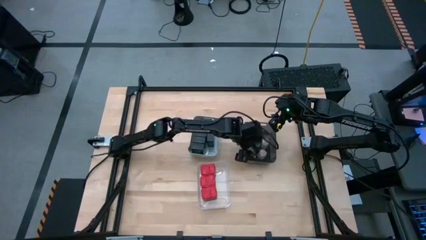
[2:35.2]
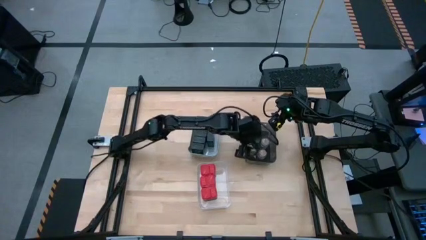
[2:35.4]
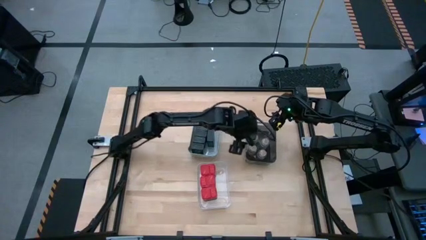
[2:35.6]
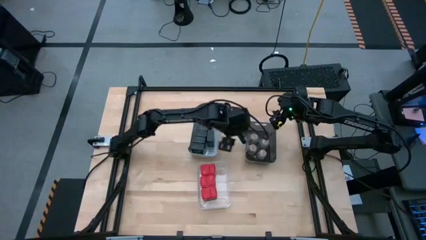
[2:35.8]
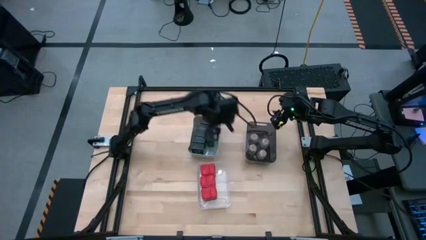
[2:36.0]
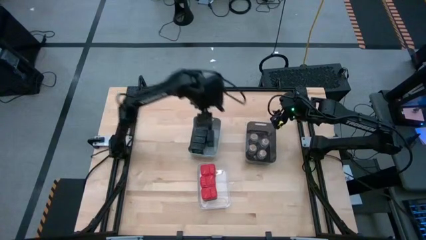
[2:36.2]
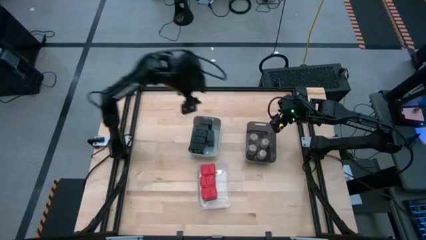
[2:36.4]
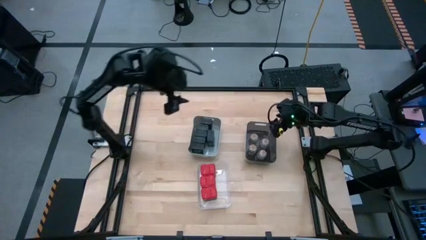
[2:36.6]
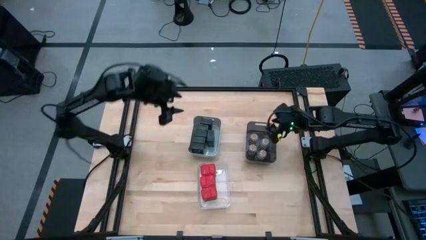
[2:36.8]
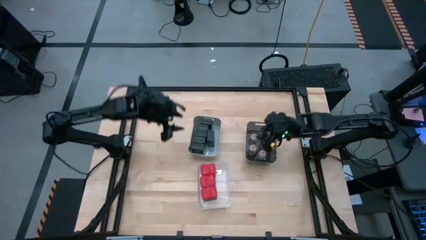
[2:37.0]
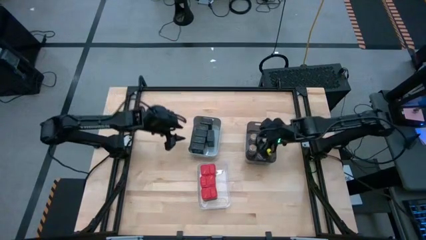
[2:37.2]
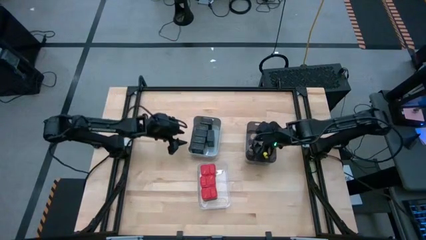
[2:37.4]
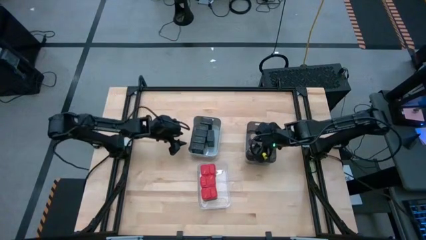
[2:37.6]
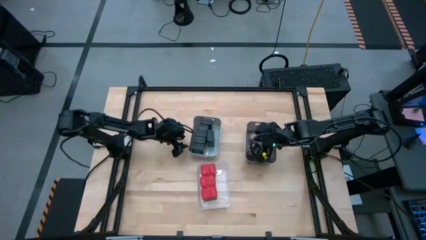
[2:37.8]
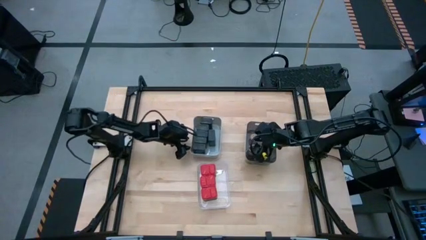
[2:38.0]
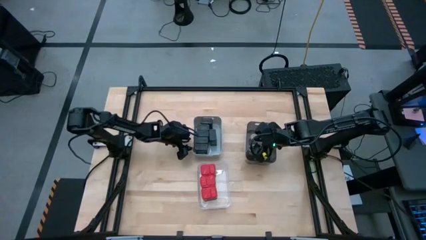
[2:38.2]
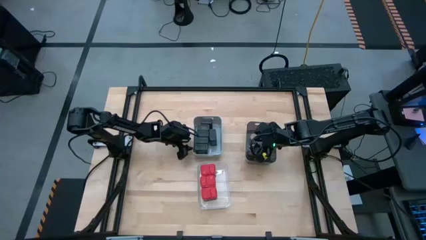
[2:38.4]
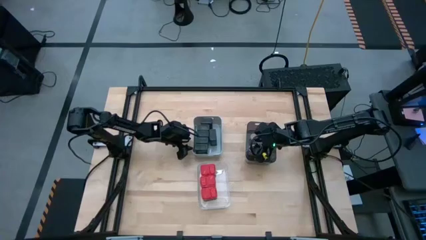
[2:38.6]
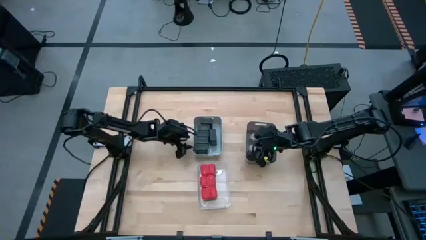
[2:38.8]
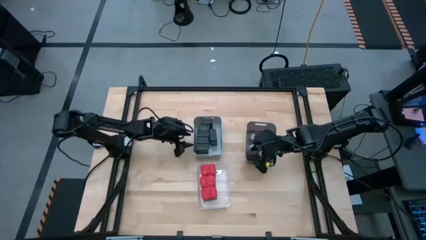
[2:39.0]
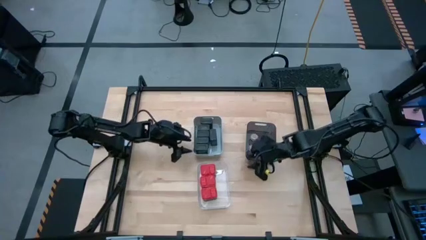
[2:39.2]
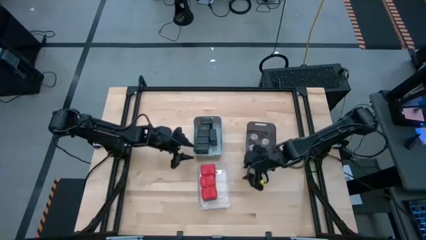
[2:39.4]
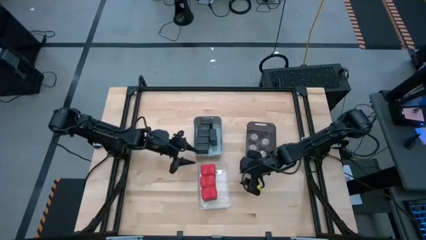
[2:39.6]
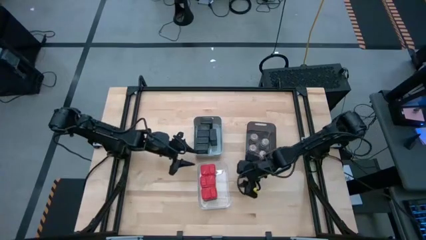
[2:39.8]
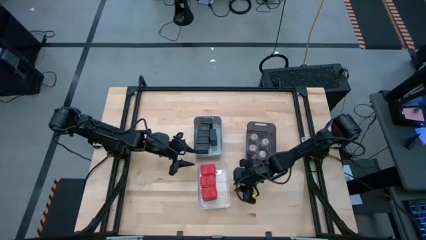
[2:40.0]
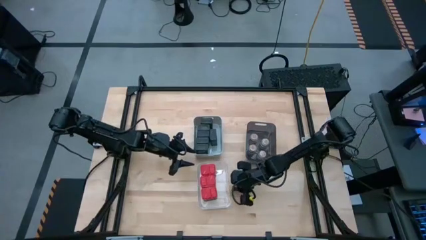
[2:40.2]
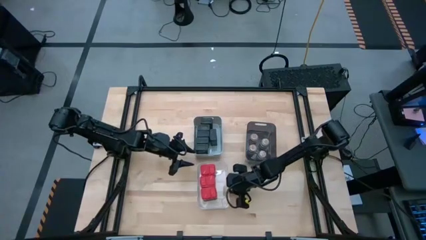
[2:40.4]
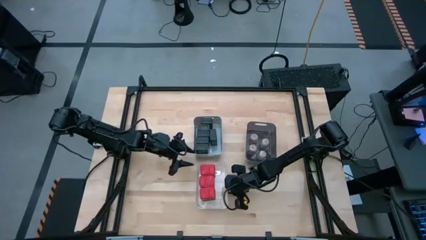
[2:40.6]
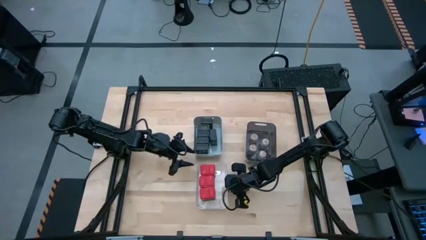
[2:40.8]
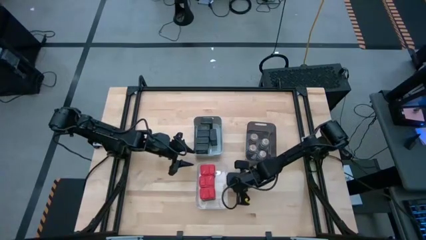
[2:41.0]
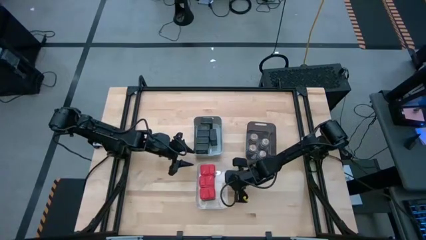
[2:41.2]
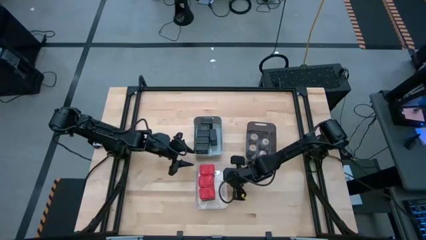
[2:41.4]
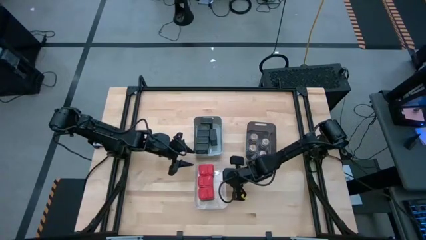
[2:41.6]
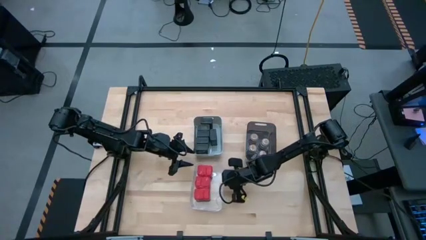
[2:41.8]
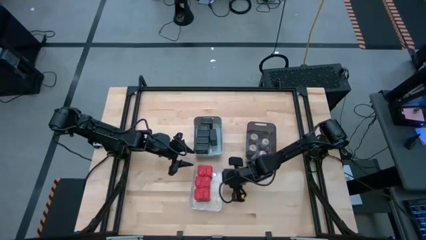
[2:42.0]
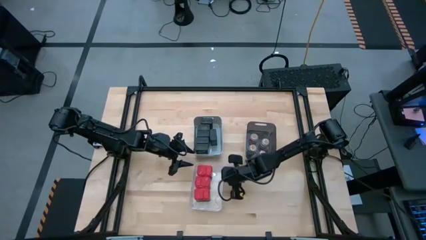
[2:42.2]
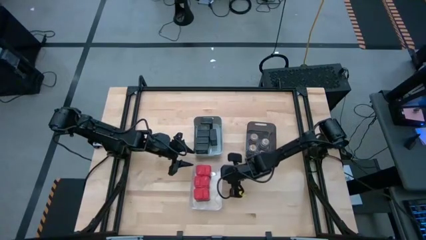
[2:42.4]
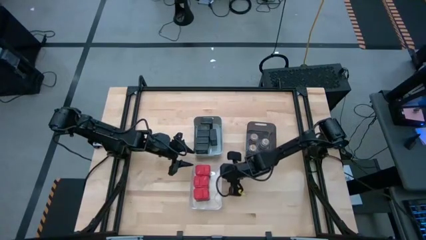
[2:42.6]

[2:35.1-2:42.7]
Task: Sort spices by type
Adjust the gray and transparent bins

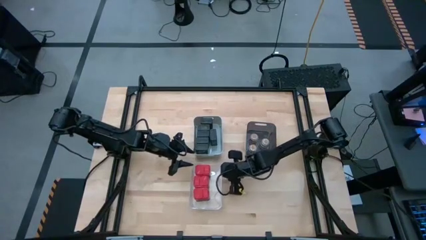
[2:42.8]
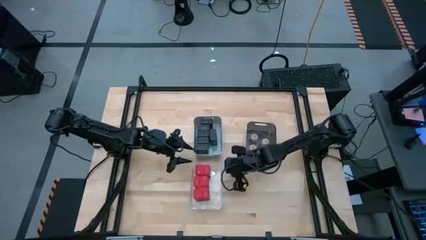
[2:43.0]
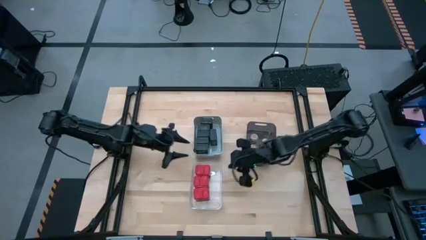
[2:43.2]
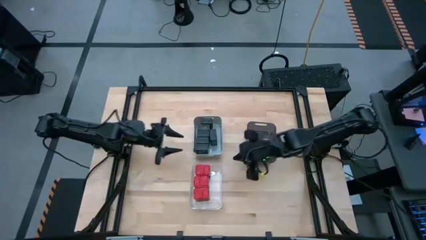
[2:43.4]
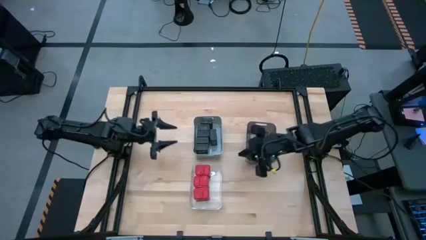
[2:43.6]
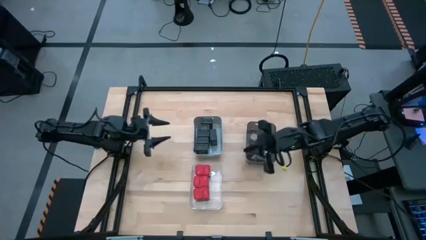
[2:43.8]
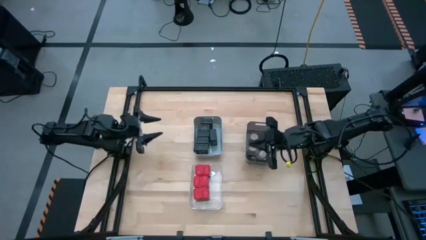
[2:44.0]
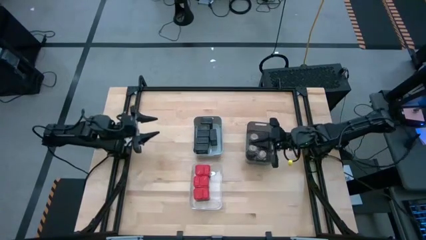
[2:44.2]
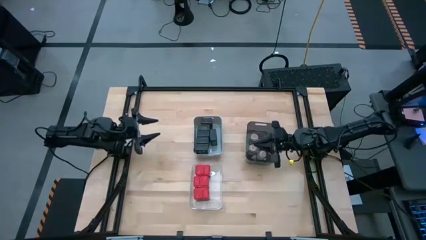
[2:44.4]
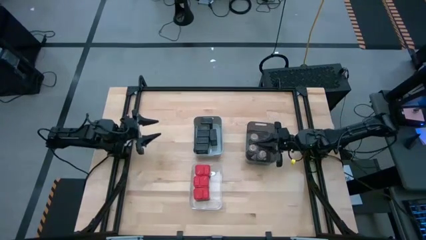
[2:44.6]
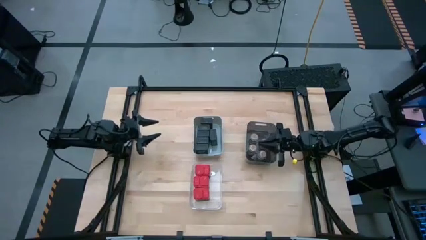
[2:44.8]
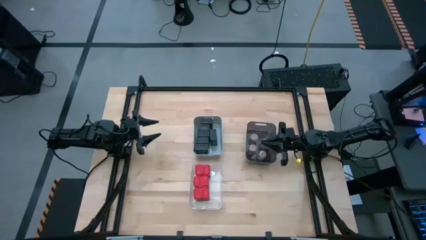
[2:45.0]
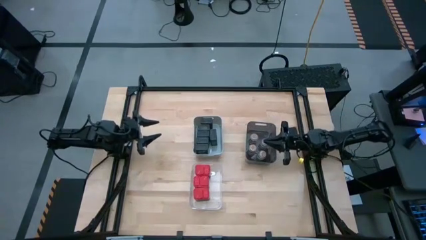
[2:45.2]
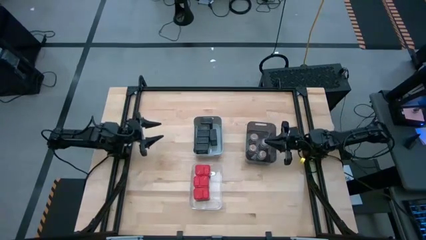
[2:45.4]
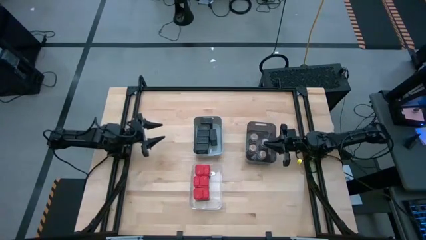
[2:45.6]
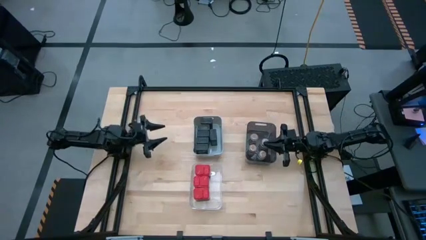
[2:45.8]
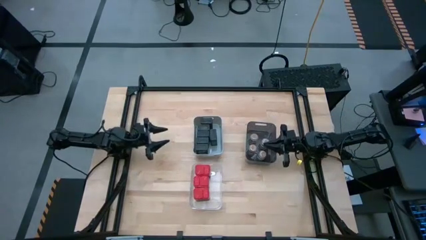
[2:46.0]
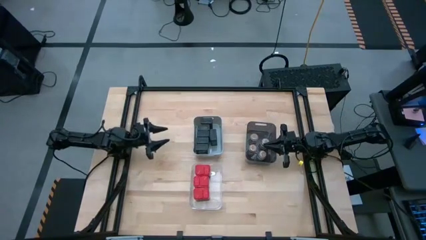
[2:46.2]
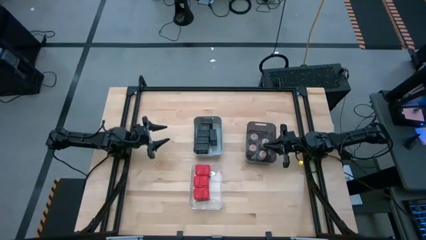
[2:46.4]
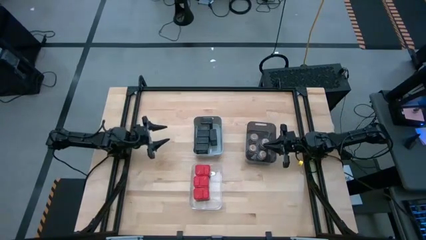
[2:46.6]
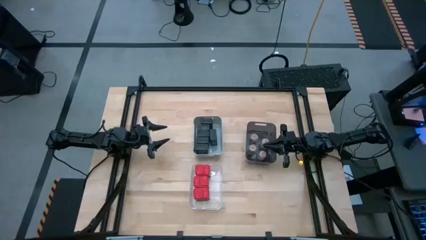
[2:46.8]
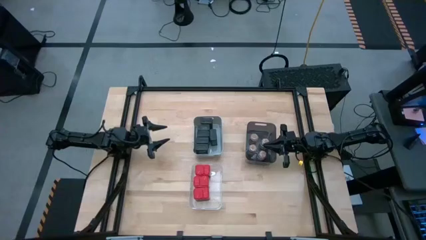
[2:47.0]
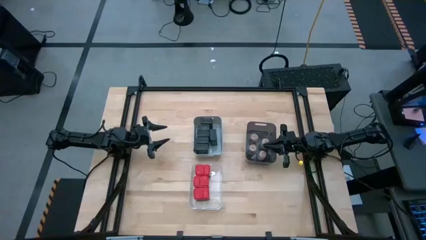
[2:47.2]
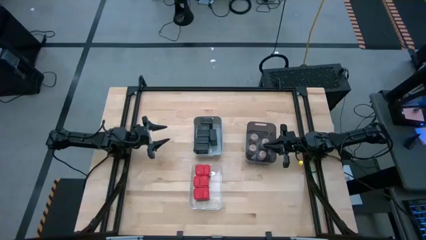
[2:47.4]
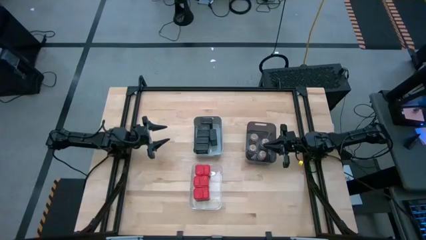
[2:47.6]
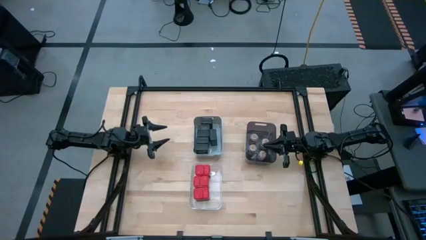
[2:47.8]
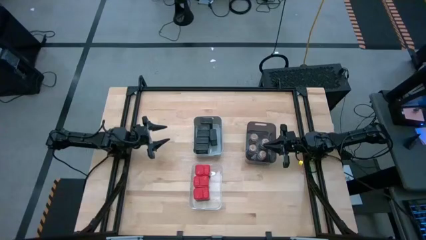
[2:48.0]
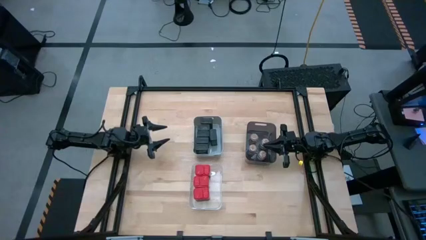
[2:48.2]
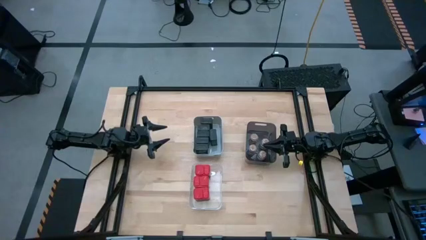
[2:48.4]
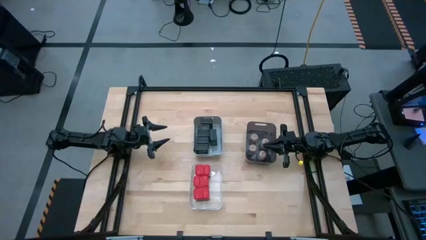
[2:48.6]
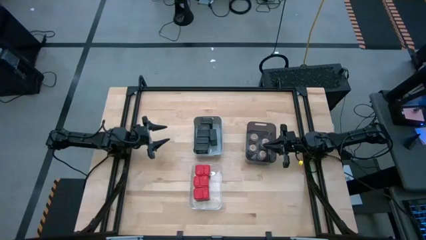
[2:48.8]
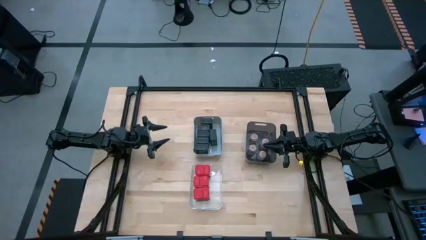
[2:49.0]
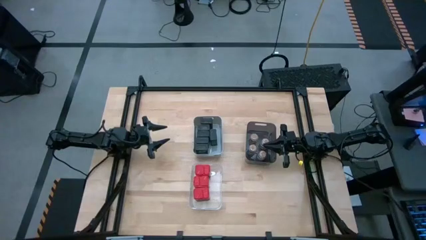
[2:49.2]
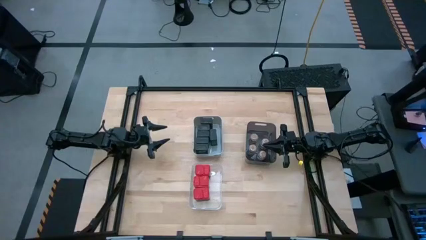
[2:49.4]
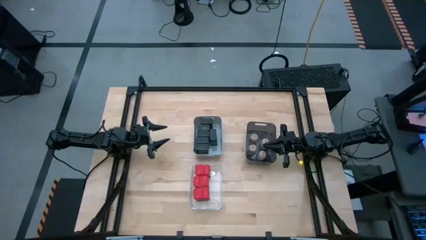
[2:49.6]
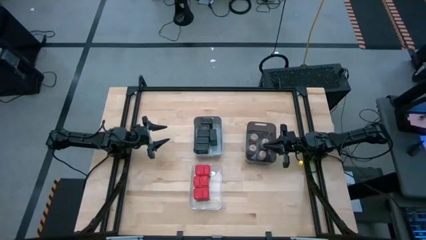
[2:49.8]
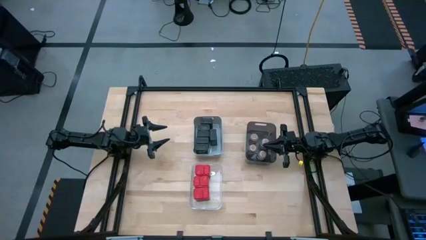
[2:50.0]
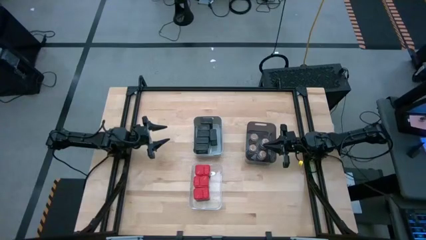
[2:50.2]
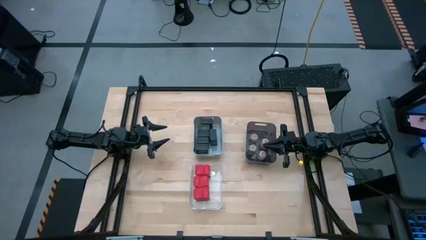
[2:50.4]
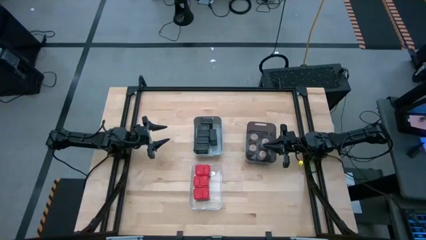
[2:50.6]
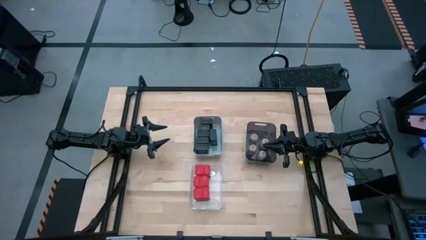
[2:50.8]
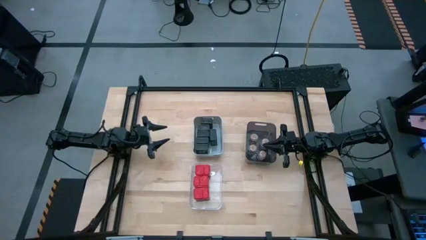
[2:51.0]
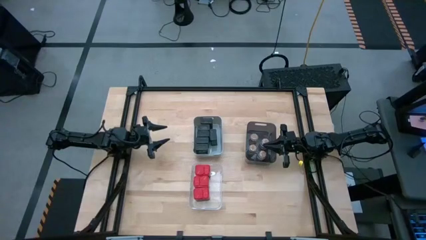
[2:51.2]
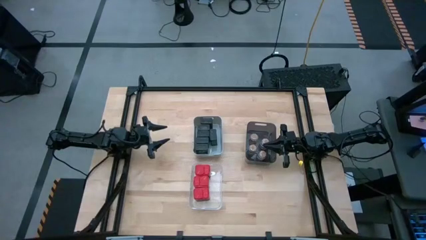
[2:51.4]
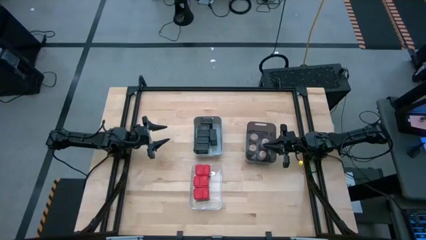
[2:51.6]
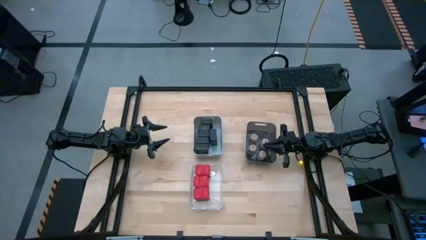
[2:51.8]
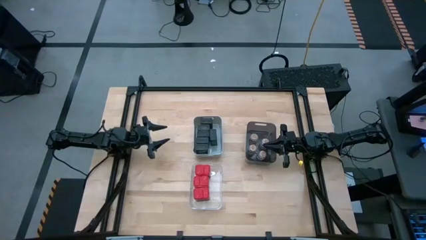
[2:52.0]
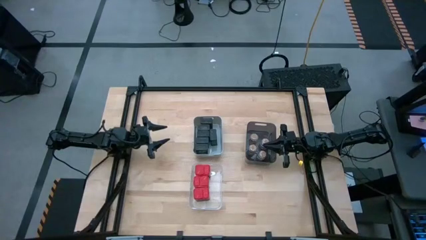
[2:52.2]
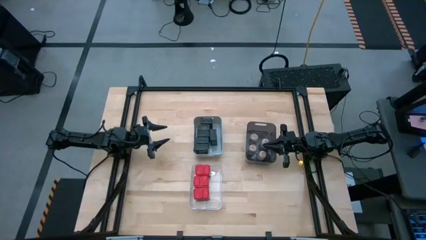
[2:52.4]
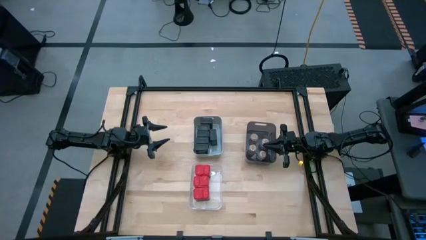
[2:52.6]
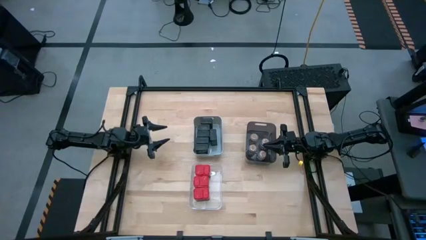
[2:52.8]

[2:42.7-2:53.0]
Return to Home Position
